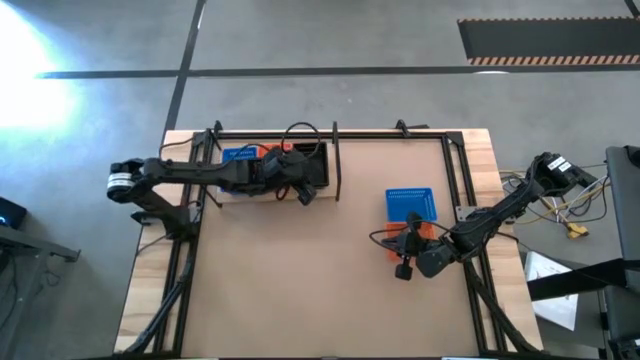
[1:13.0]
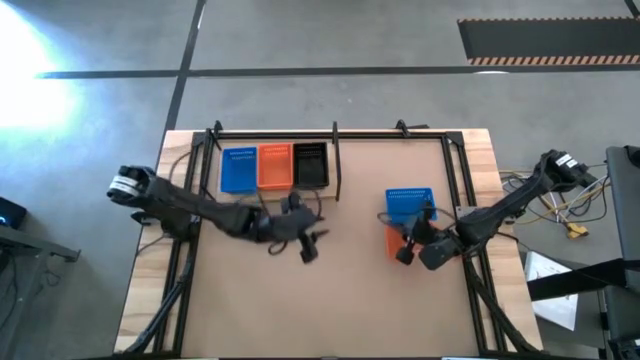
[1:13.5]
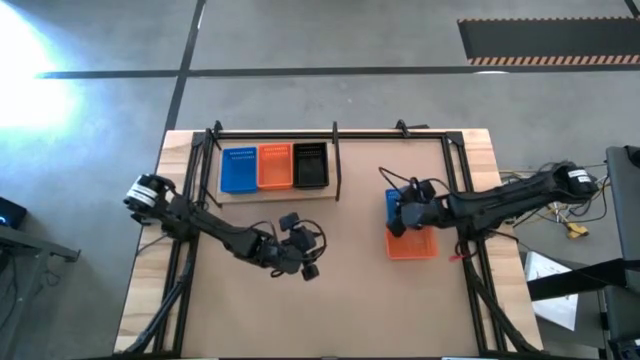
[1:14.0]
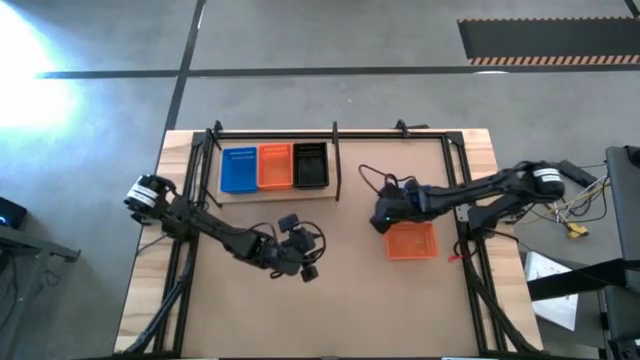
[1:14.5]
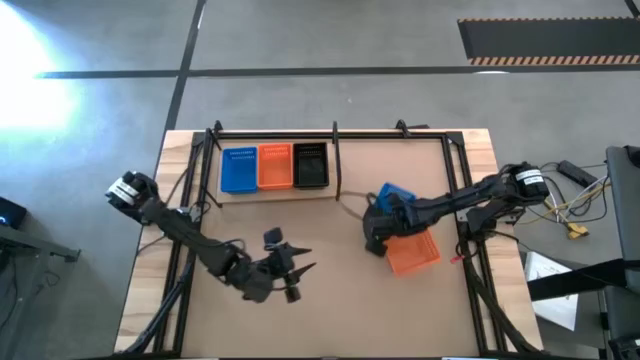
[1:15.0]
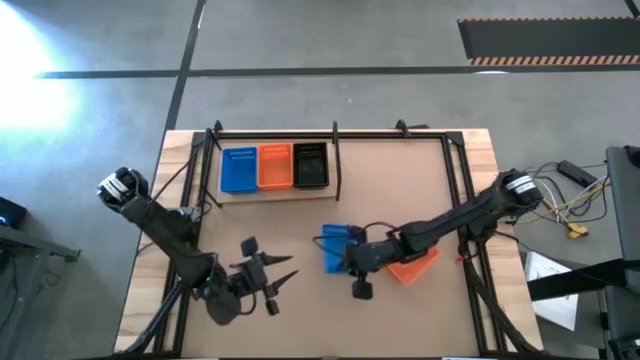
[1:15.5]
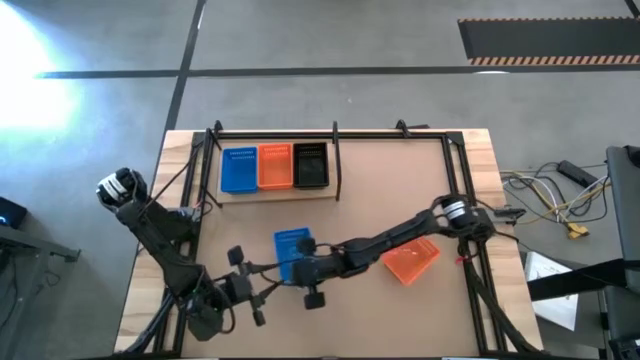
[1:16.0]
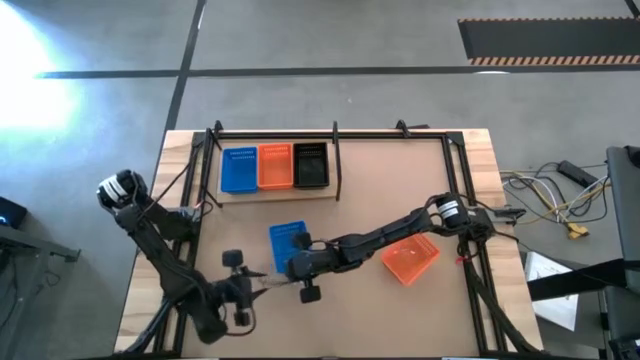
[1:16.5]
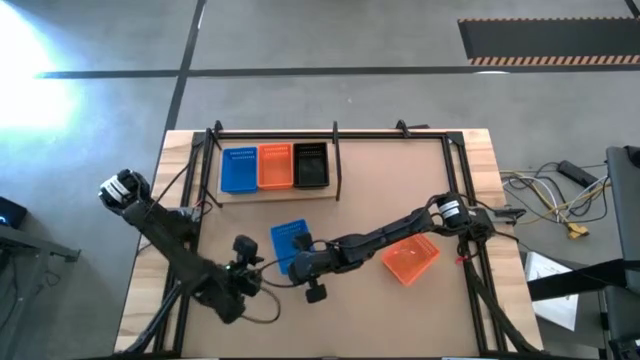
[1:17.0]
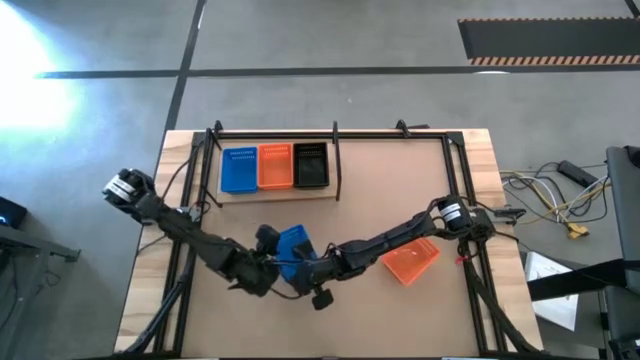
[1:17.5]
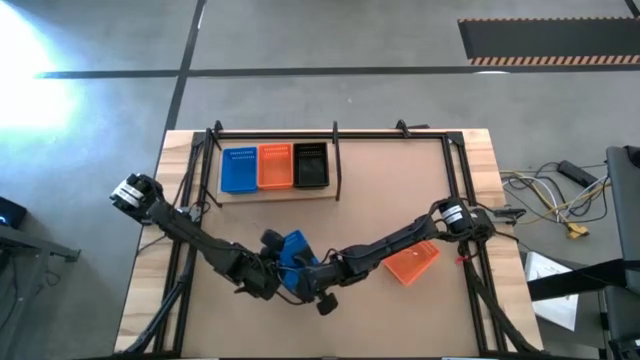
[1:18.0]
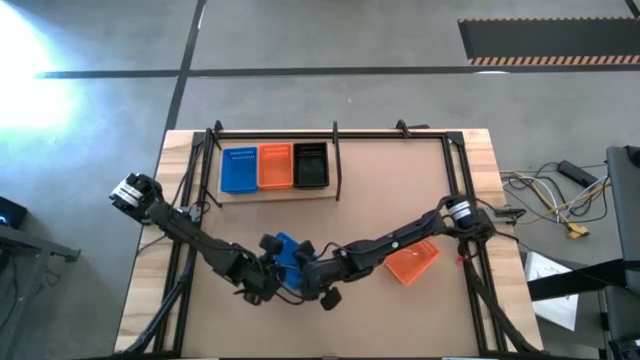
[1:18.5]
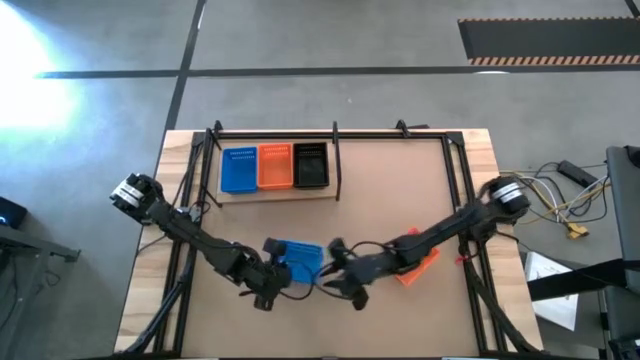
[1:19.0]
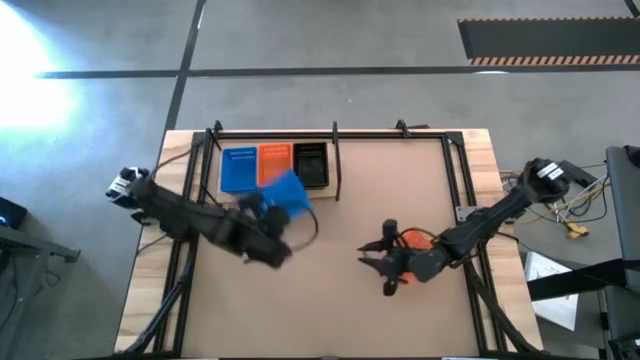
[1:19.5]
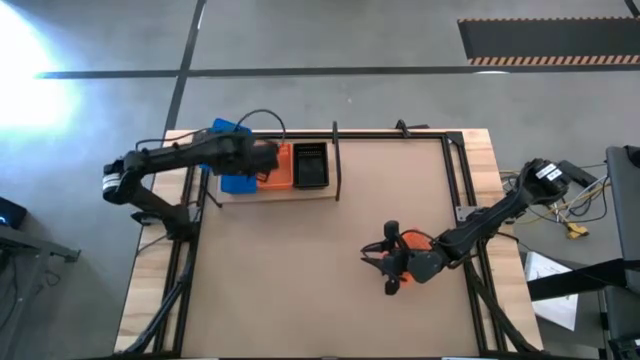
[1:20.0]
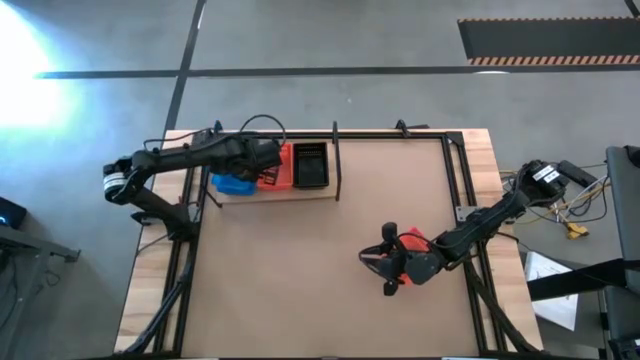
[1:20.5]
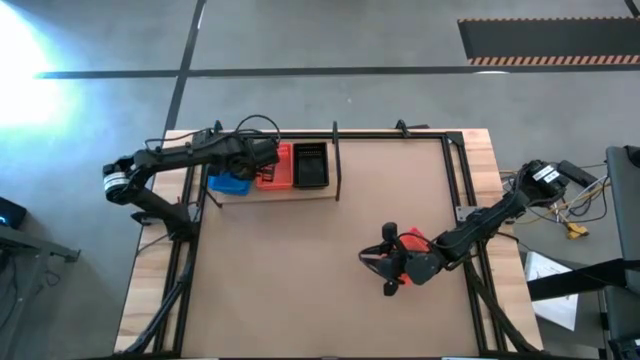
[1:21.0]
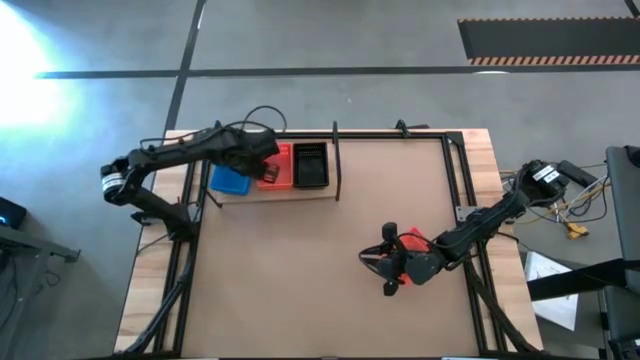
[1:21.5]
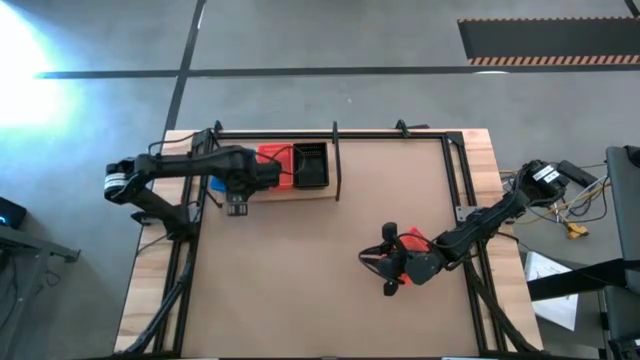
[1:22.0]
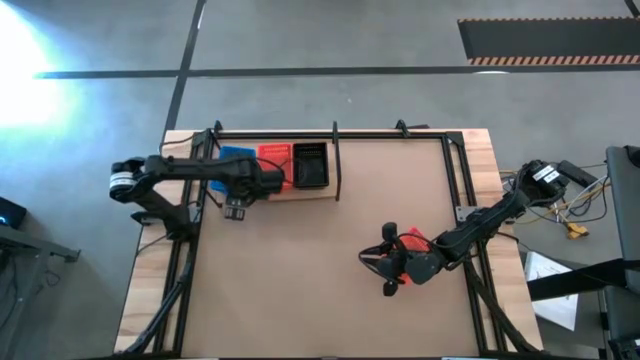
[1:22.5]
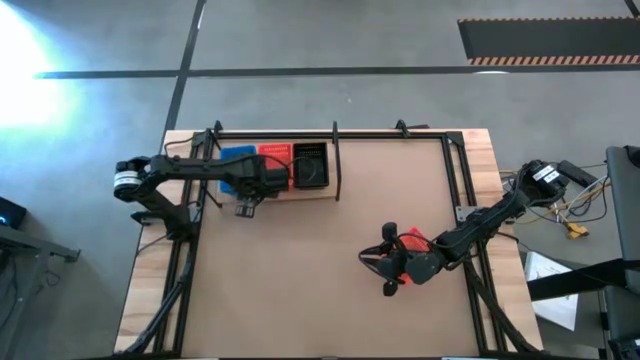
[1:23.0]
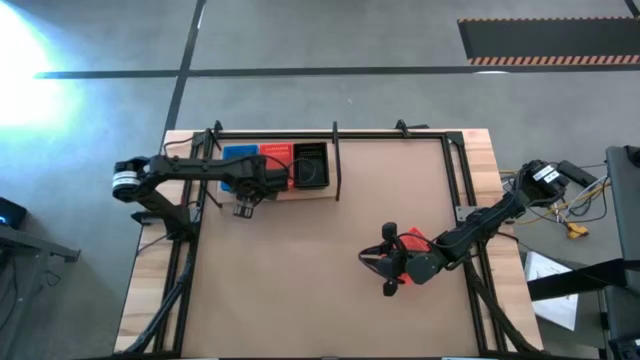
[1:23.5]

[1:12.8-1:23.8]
Task: Stack baskets on shelf by color
Stack the blue basket on top of the stacked blue baskets on the shelf

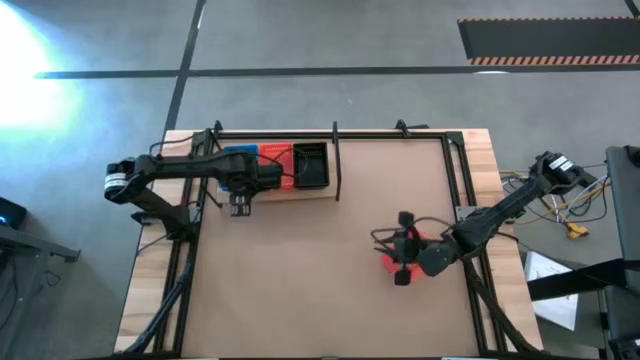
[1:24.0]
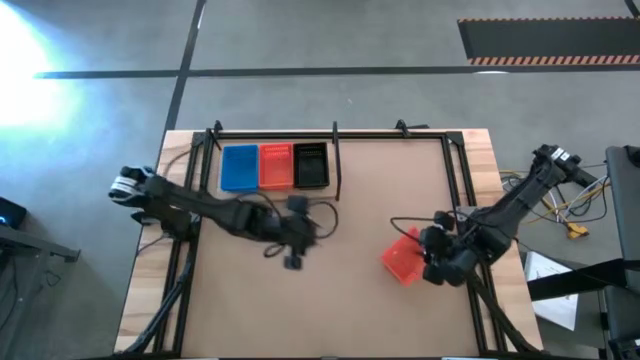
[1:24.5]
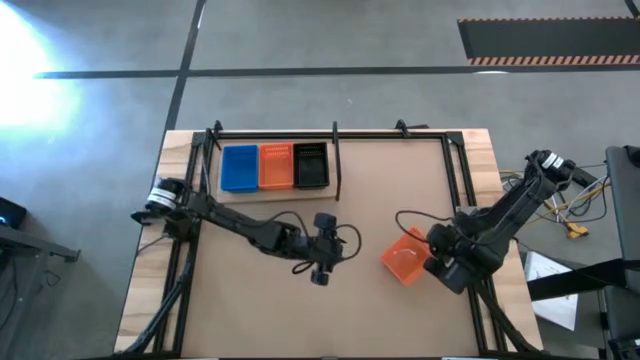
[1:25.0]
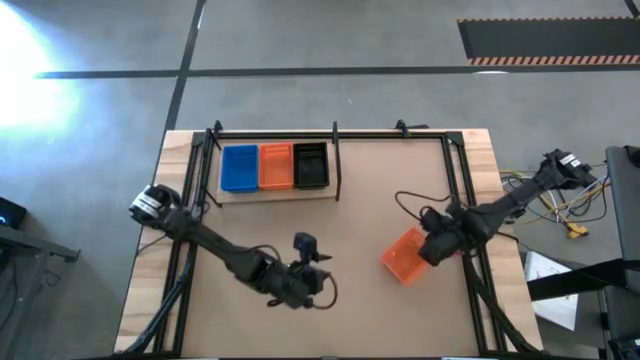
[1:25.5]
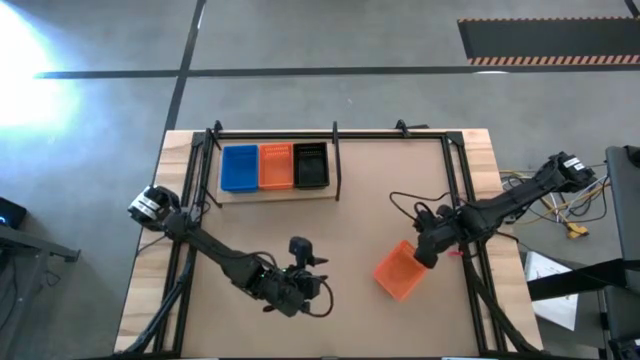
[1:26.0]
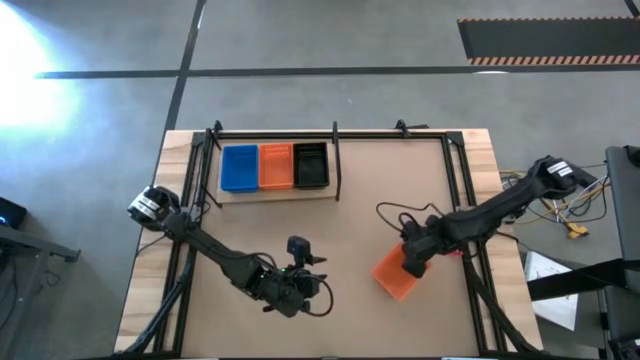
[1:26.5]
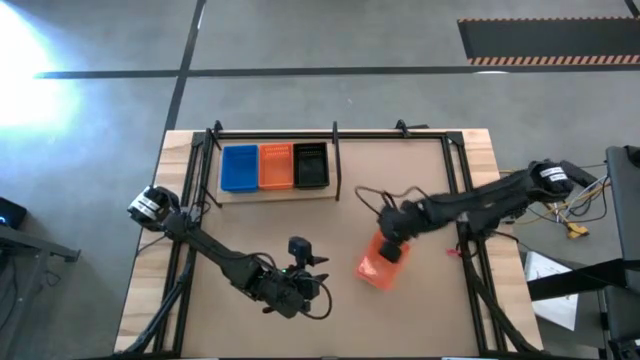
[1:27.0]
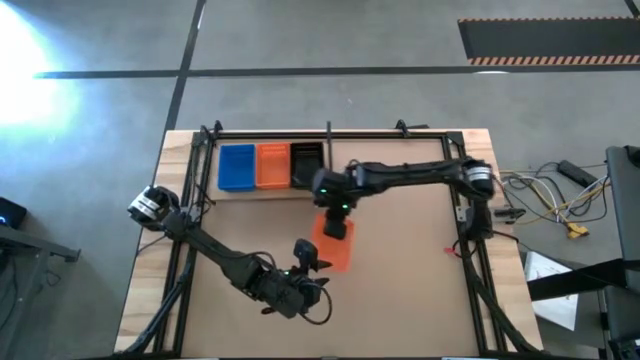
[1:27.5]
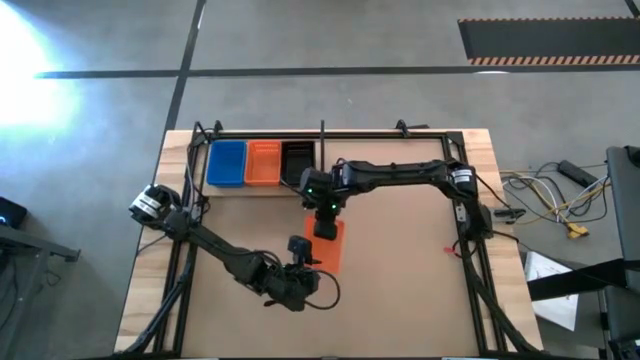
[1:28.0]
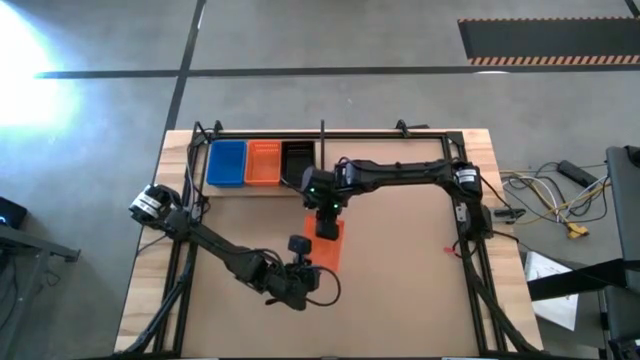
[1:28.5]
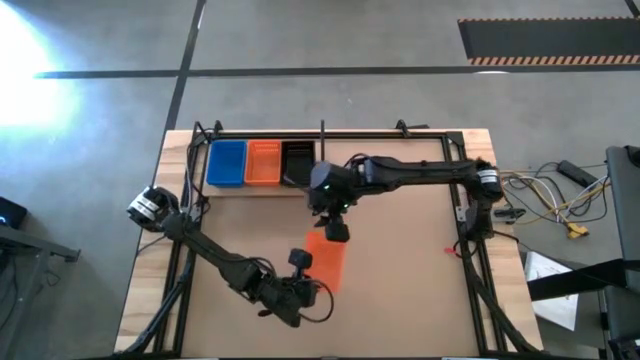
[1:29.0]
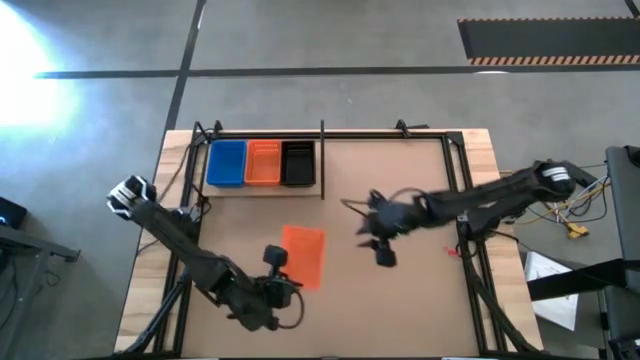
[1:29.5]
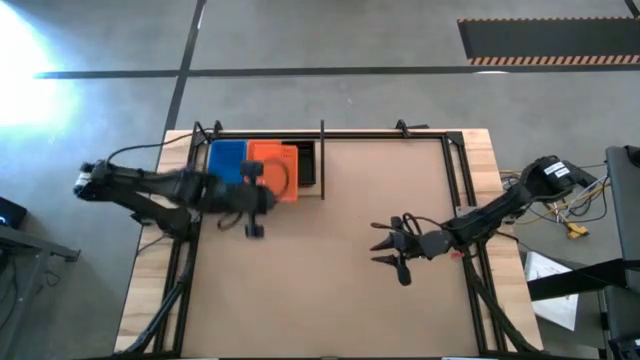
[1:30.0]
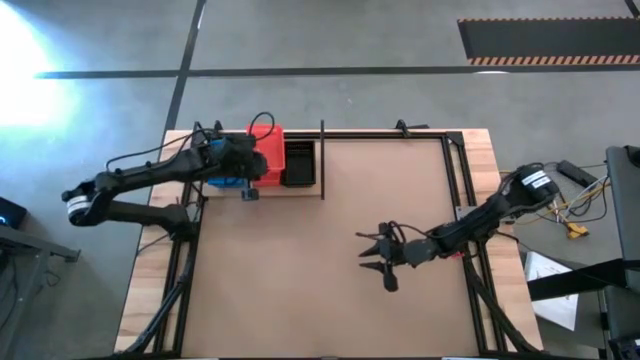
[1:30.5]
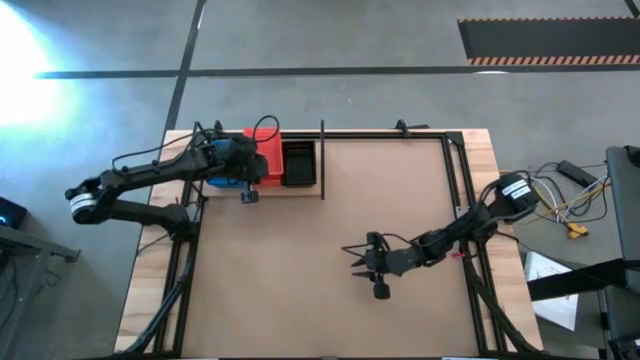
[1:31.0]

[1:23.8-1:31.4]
Stack the orange basket on top of the stacked orange baskets on the shelf

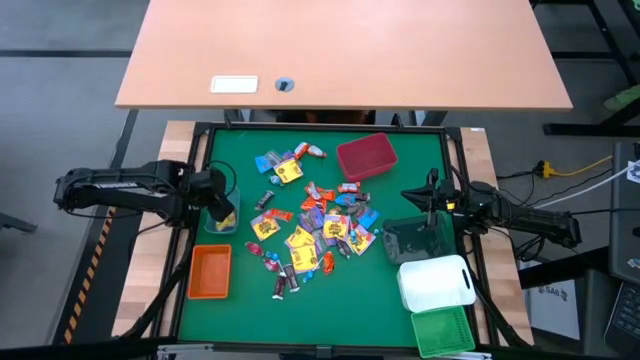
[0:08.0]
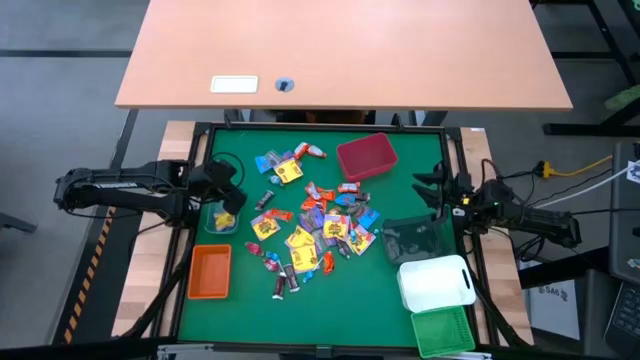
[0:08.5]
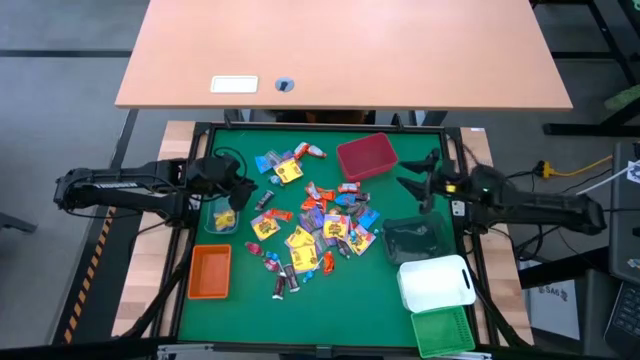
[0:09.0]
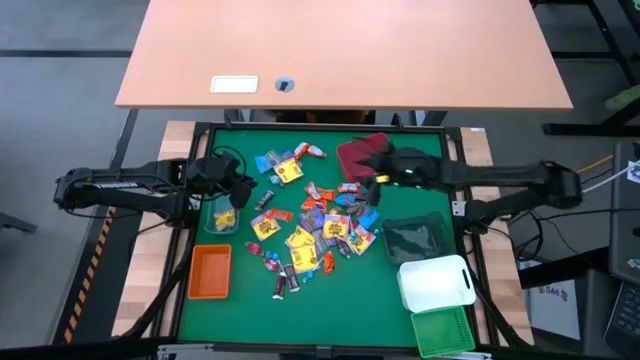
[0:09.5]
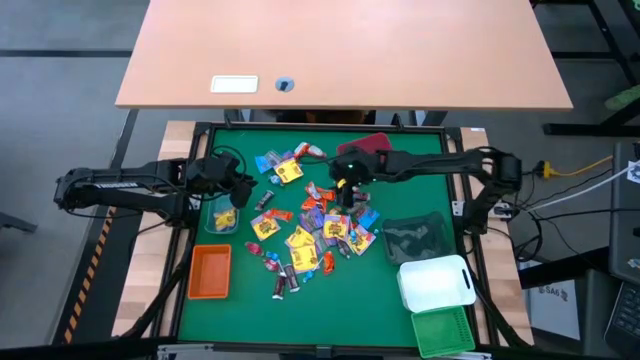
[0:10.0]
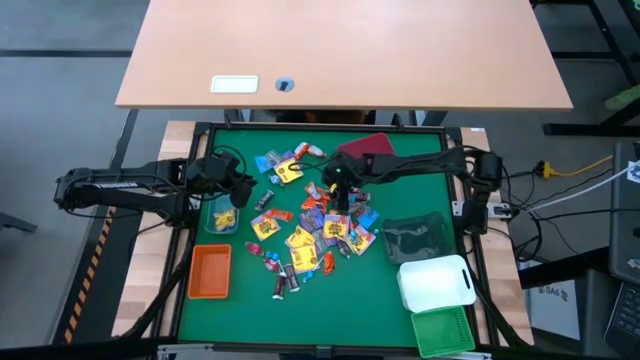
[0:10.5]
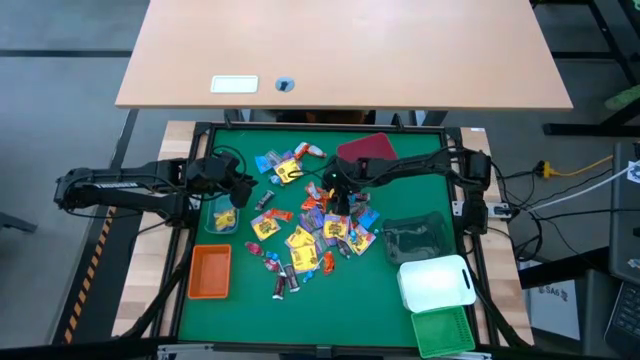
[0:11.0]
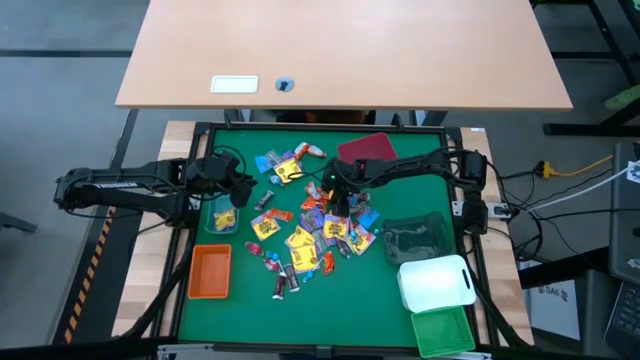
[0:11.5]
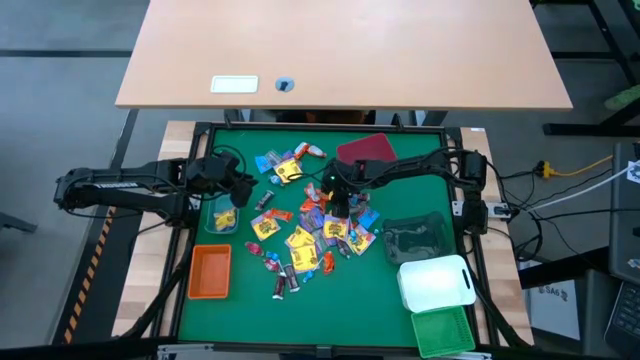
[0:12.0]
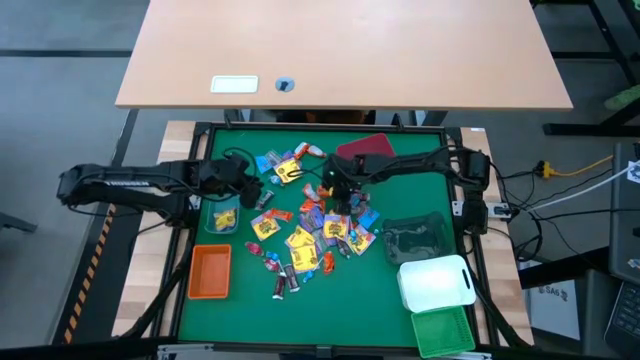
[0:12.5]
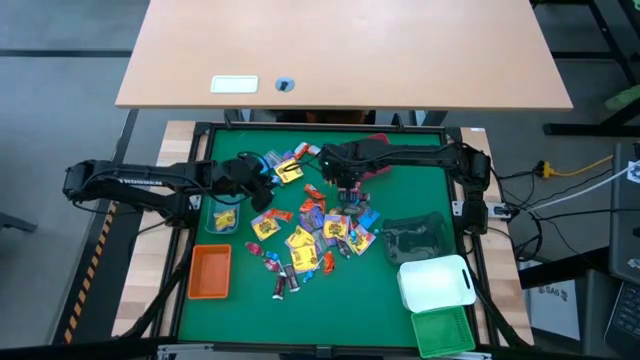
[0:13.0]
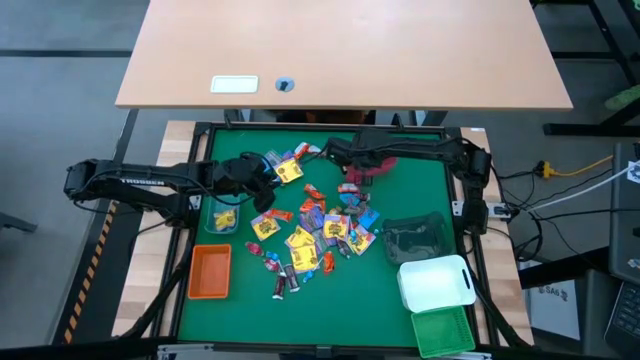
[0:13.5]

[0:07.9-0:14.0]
Task: Sort candy
Put the orange chocolate bar into the red bin
